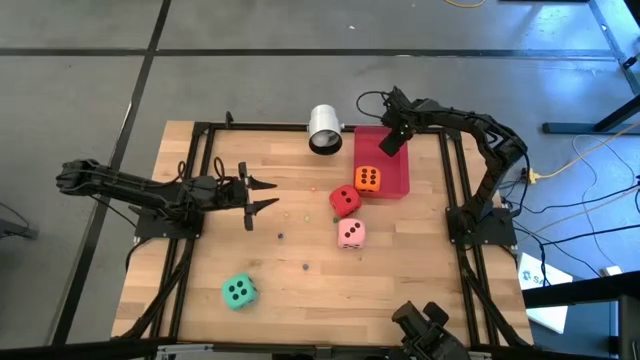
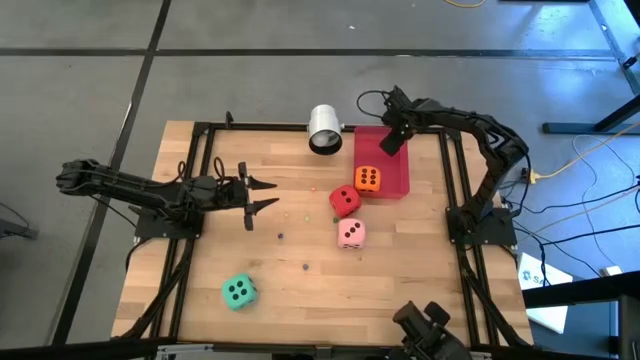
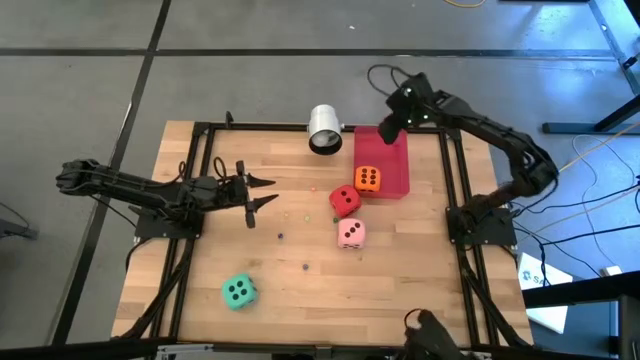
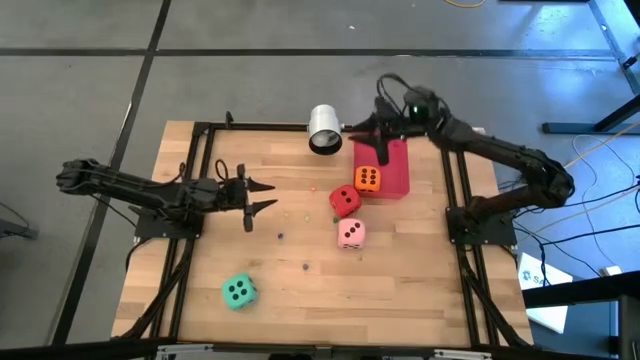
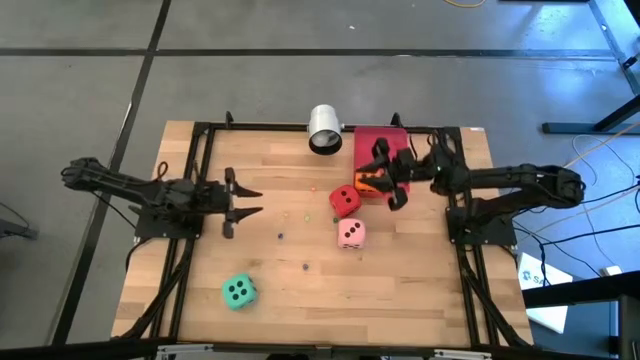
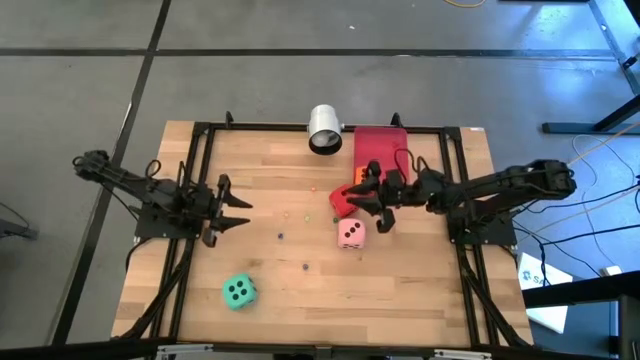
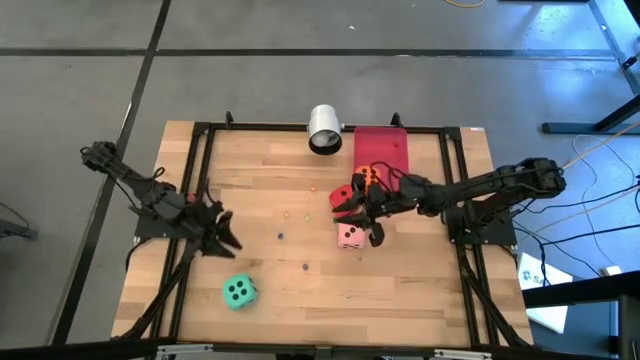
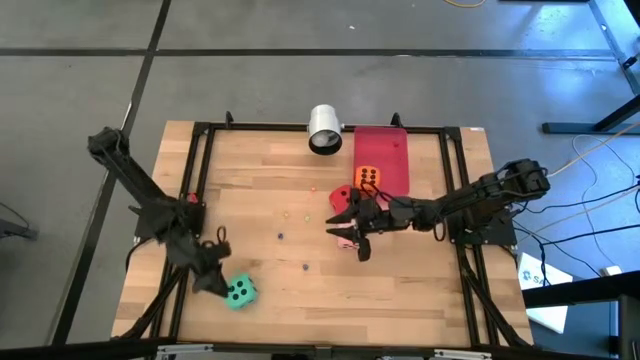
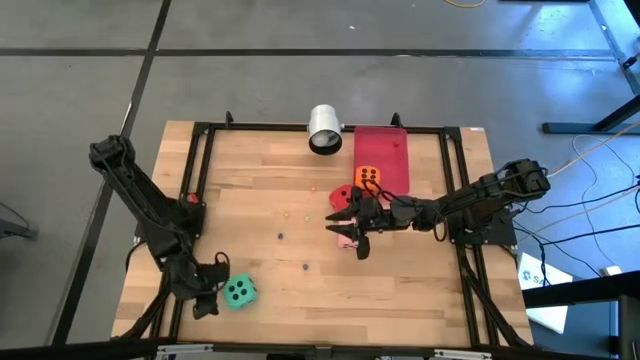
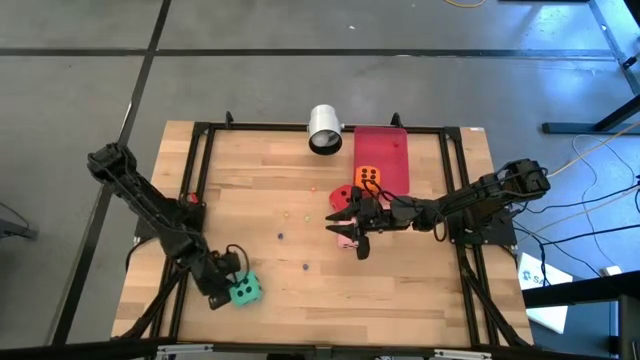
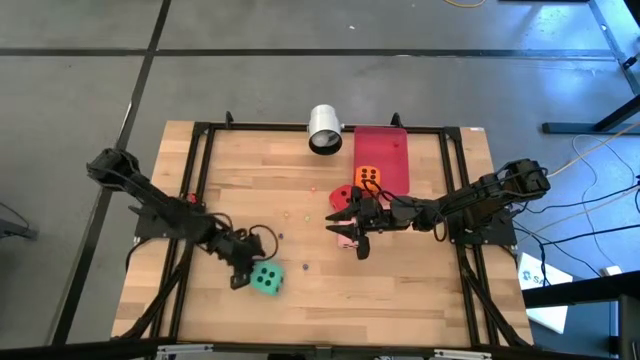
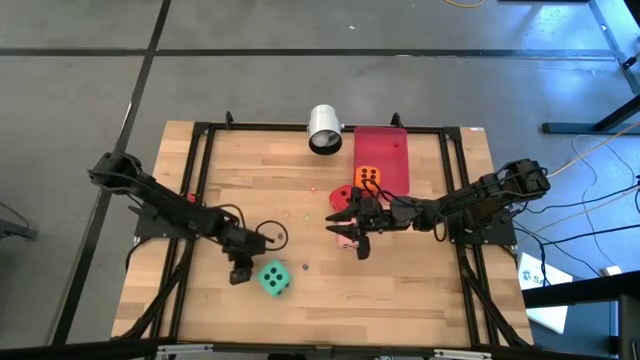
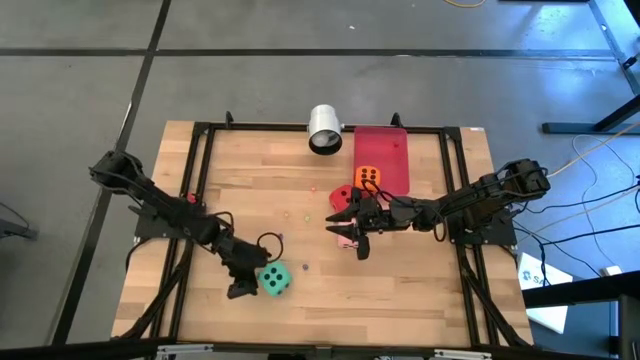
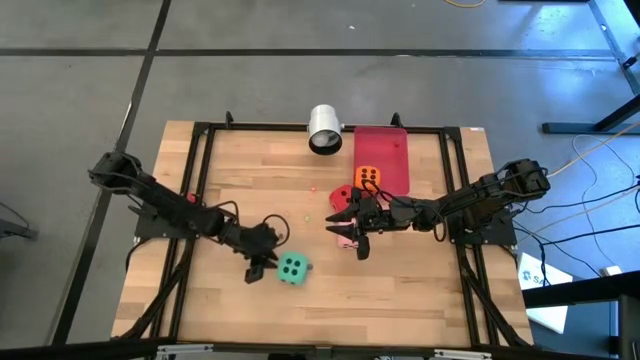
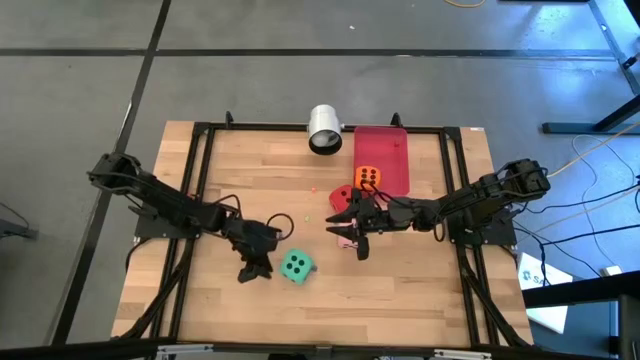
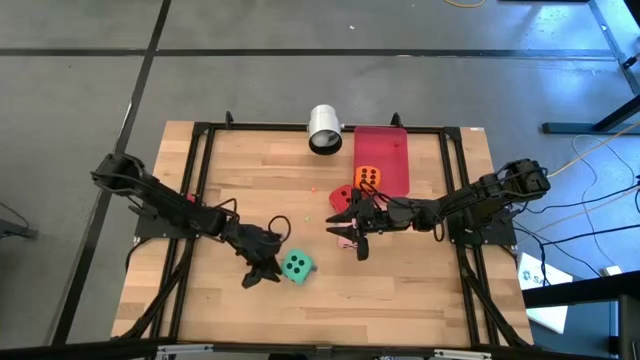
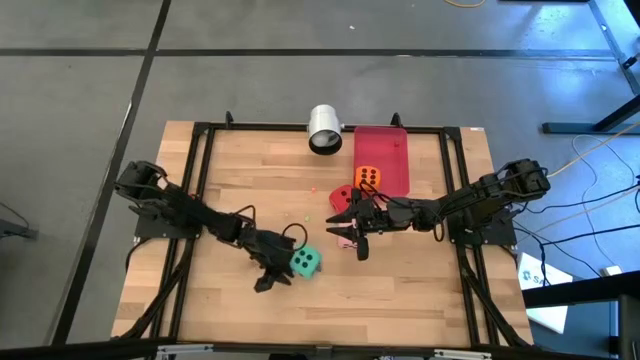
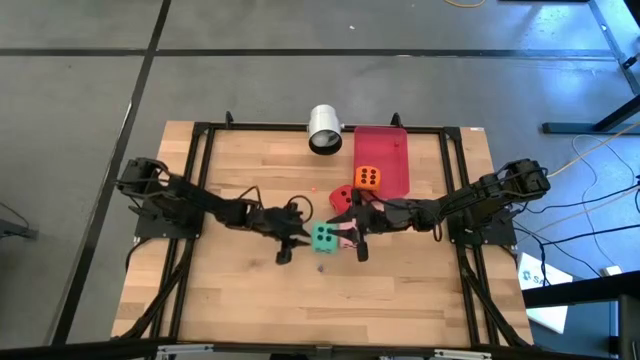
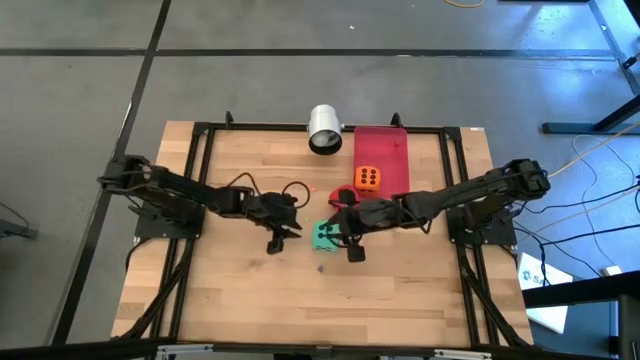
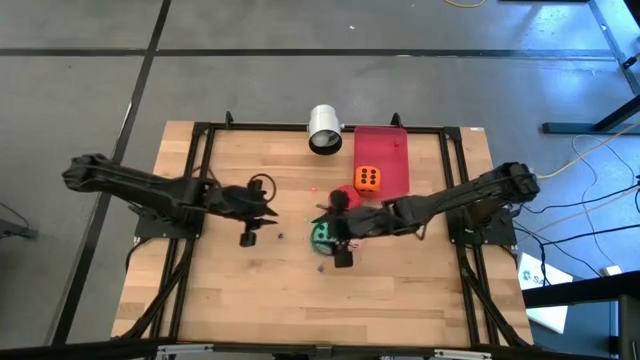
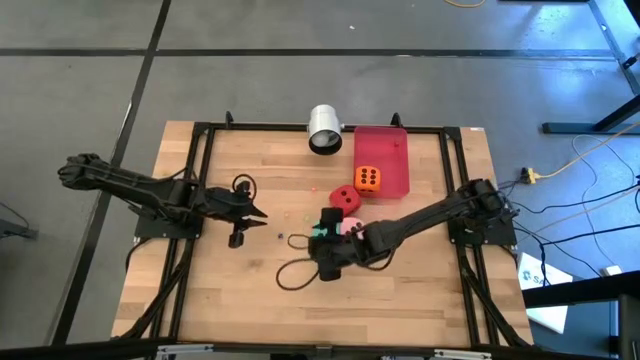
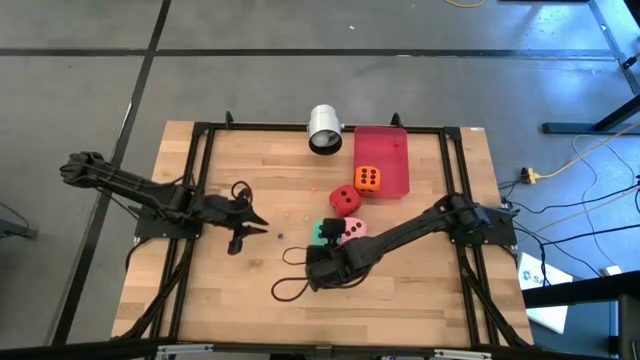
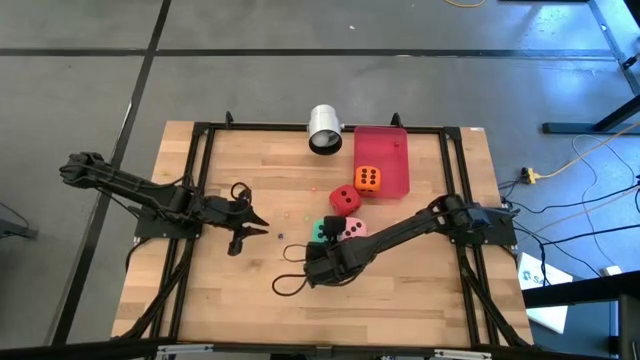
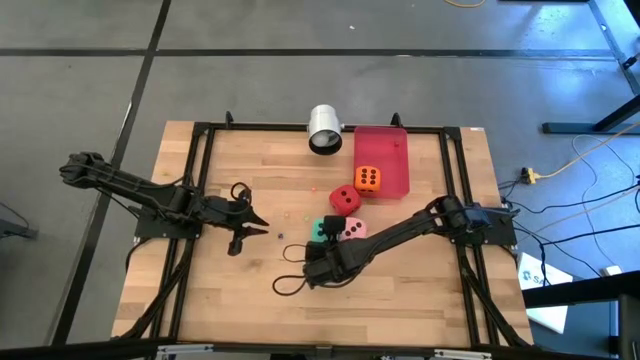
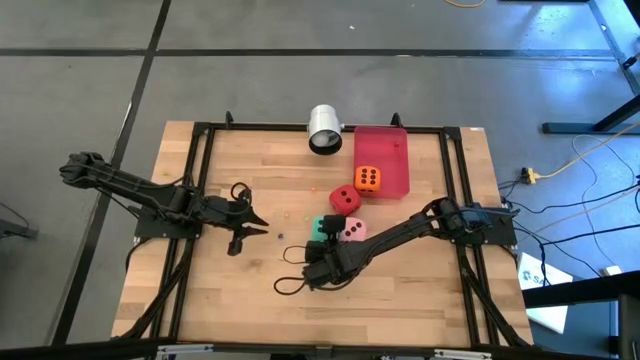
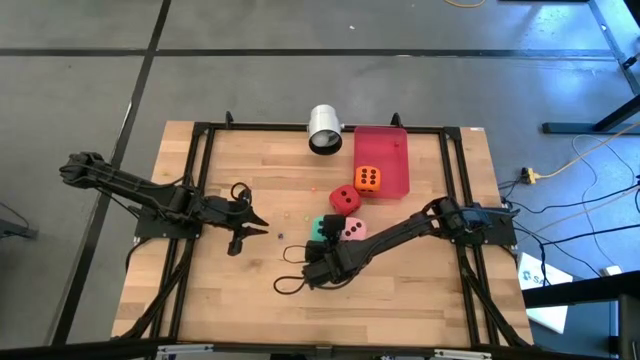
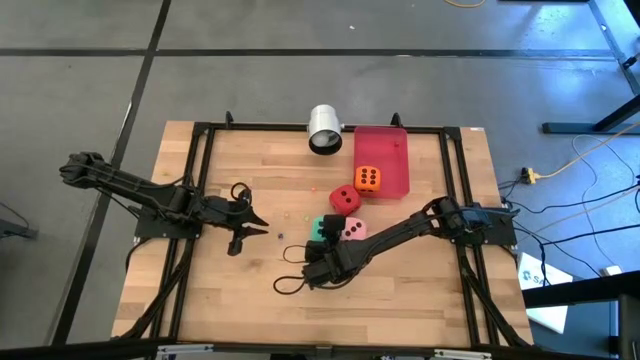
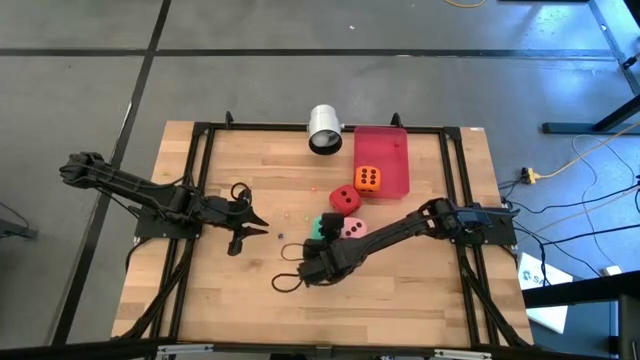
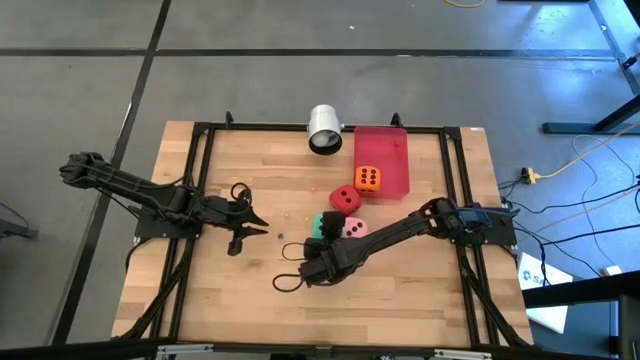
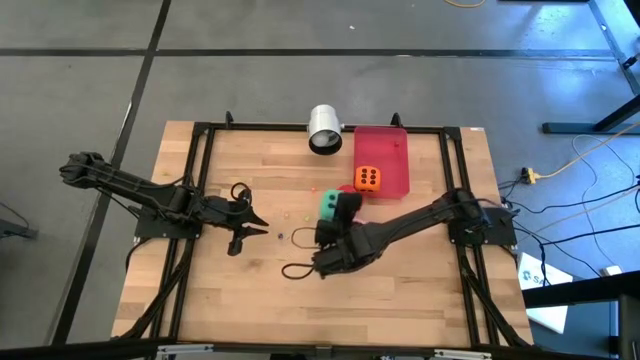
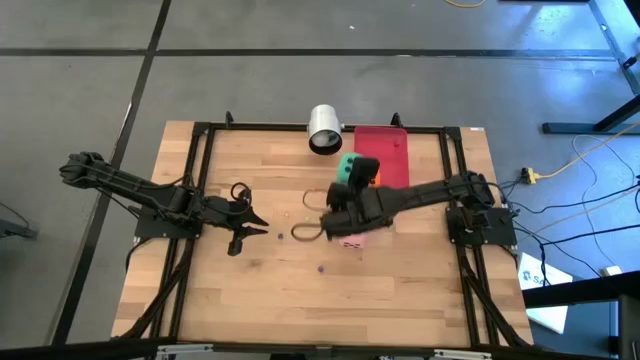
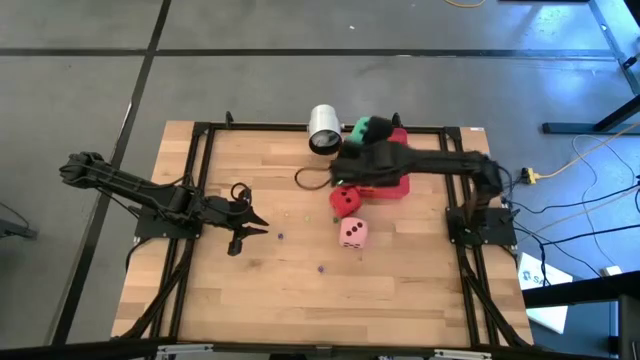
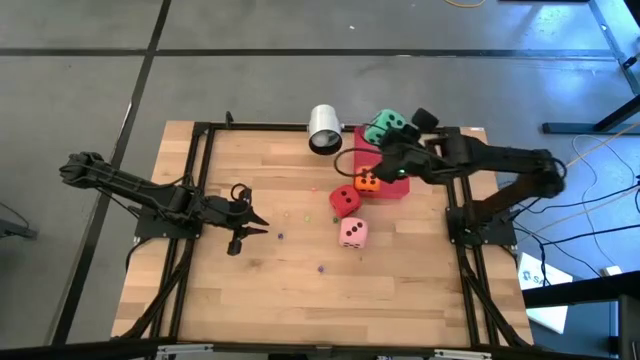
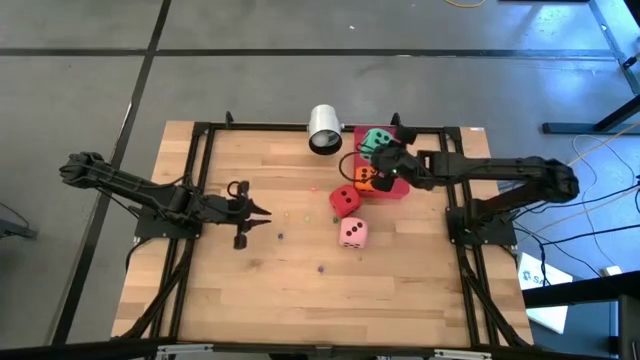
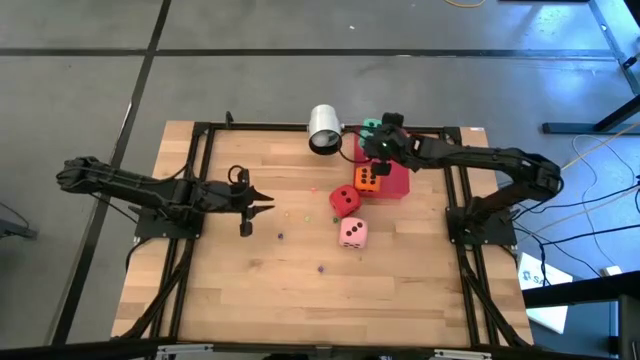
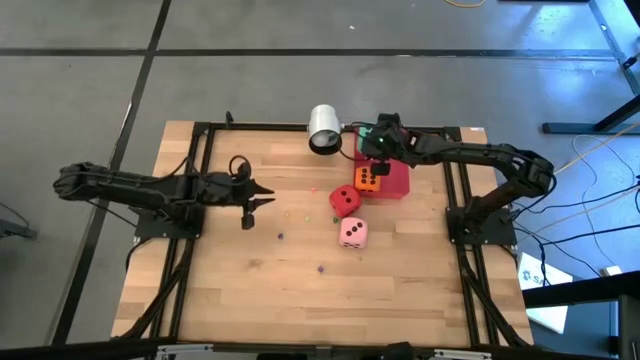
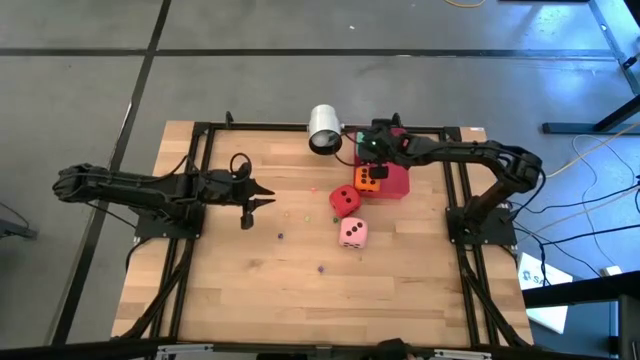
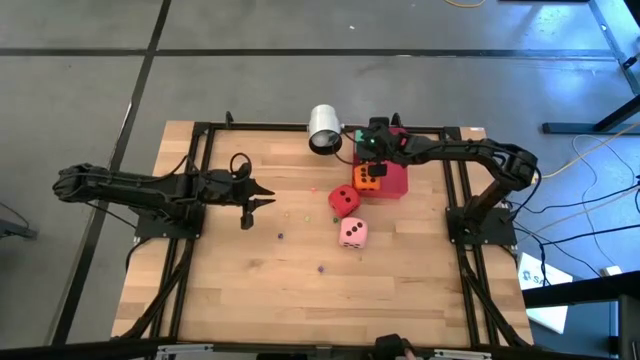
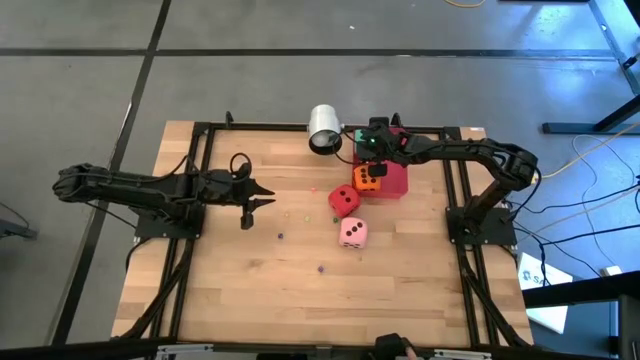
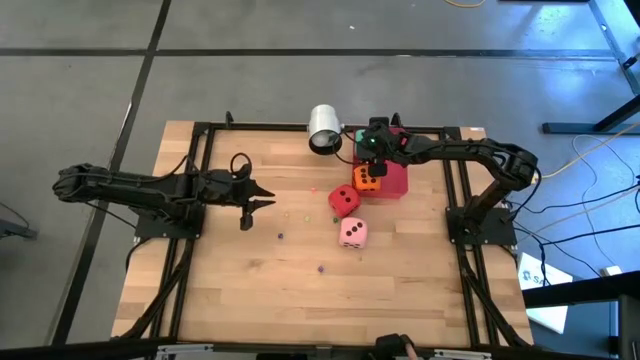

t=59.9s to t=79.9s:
Task: Pick & Place Dice
Put the big blue dice into the red bin

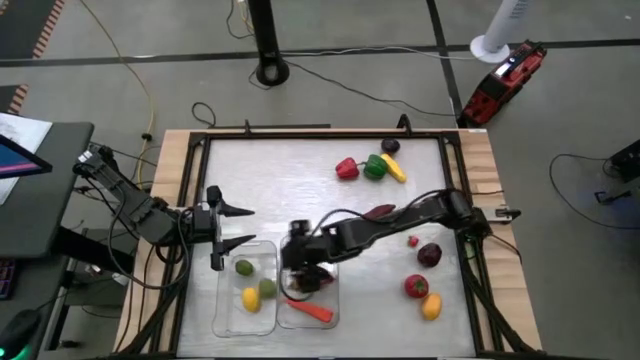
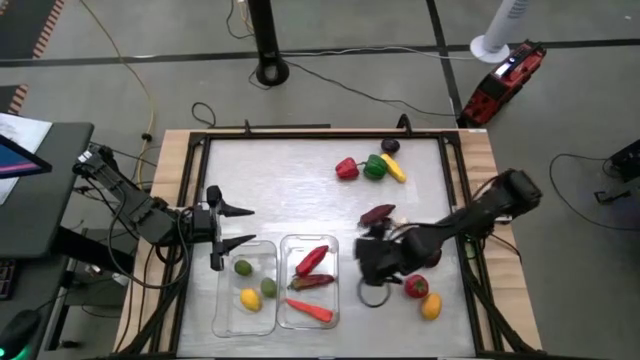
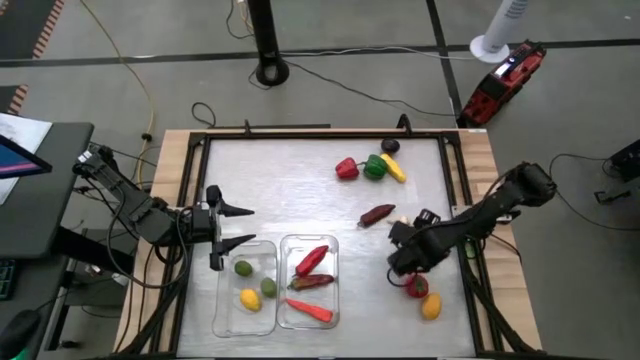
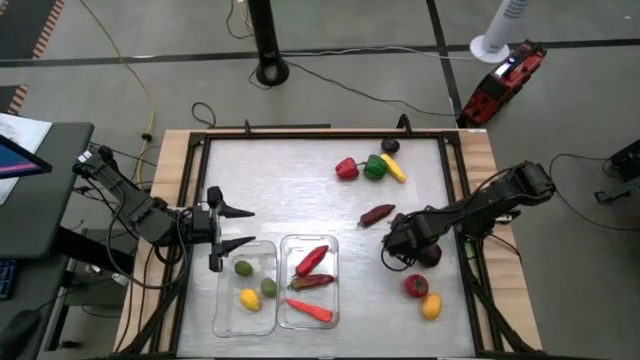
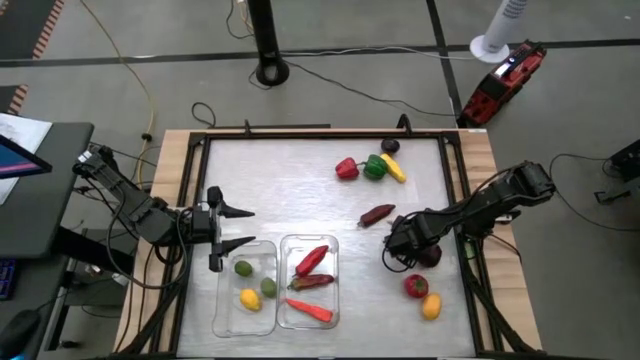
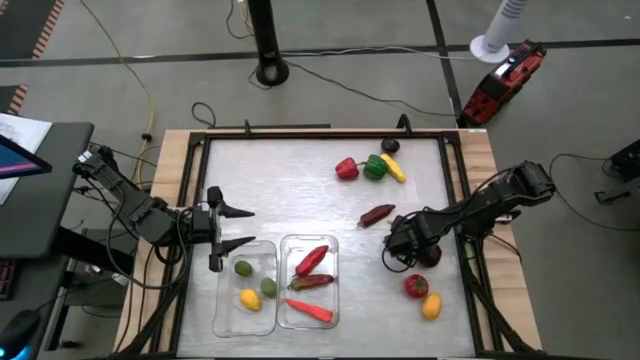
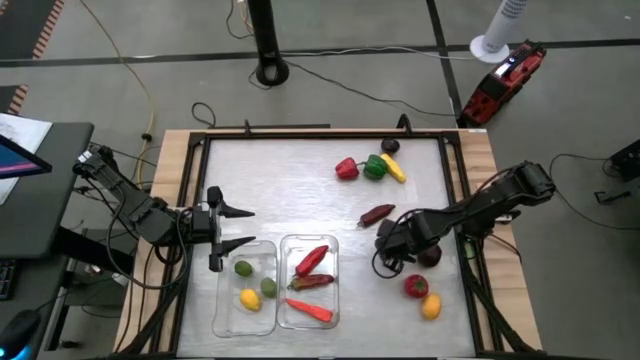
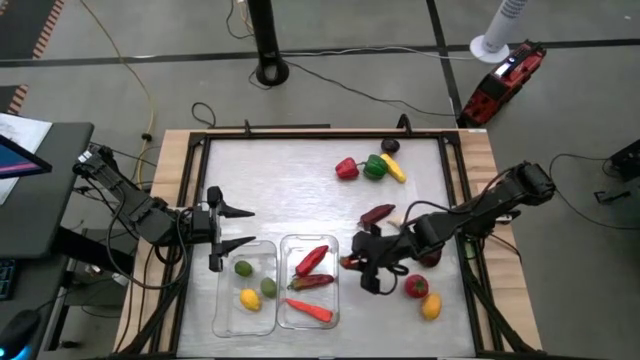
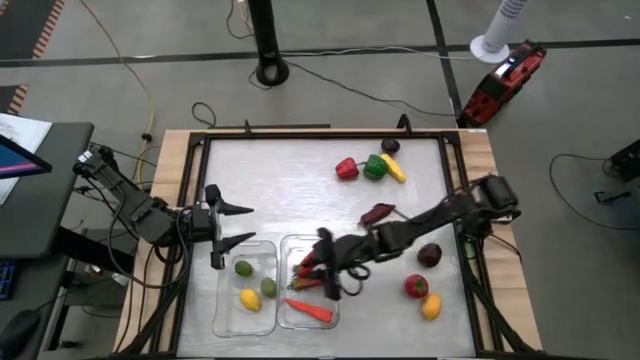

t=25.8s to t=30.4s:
Task: Sort produce into baskets
Put the red peach into the left transparent bin
